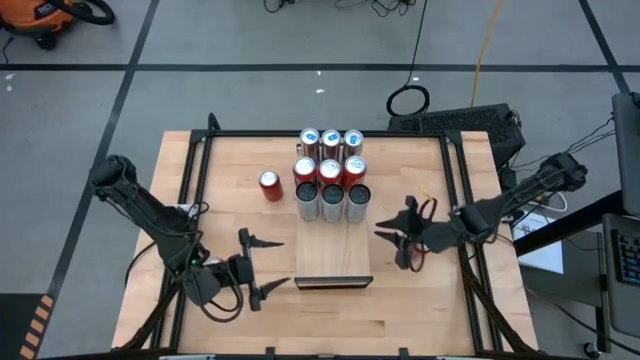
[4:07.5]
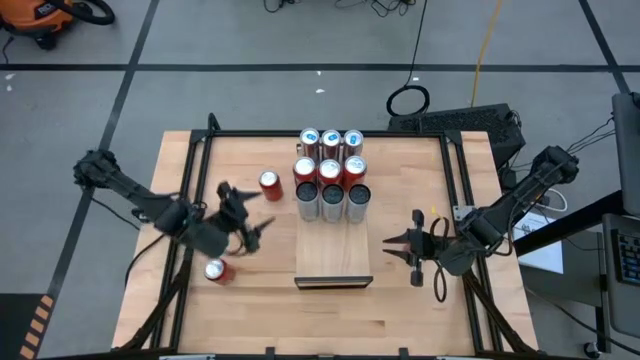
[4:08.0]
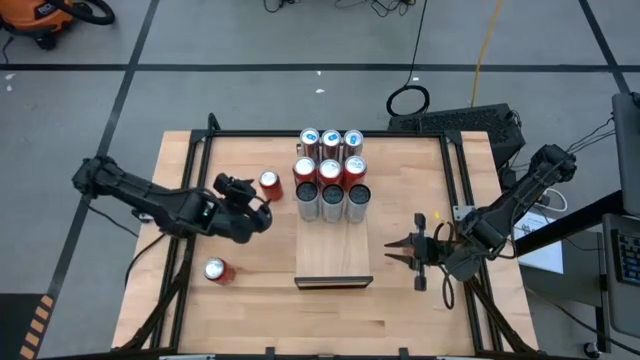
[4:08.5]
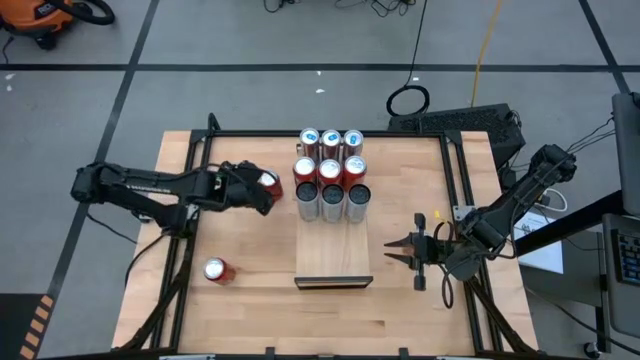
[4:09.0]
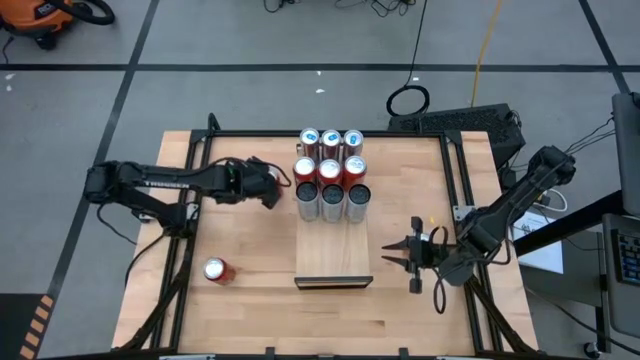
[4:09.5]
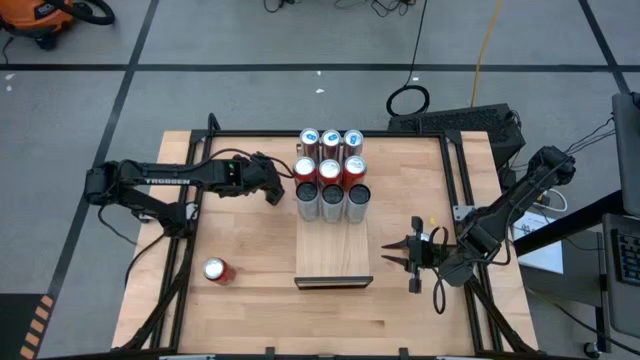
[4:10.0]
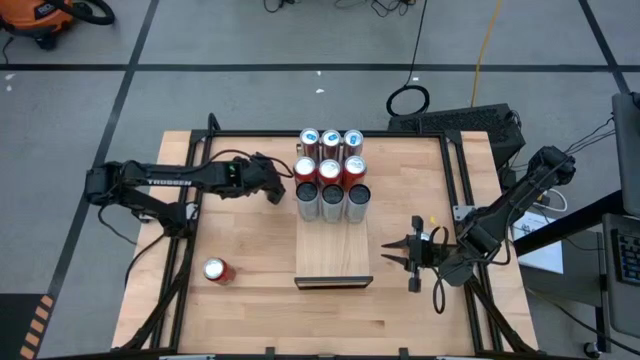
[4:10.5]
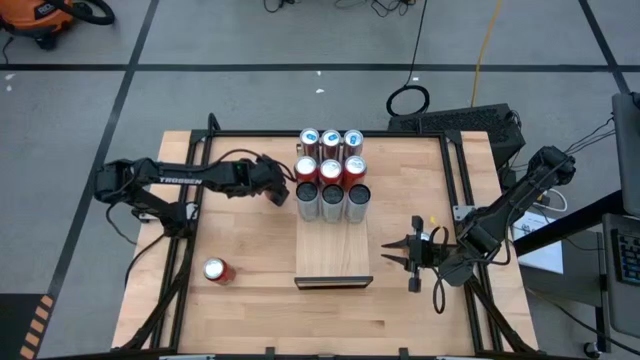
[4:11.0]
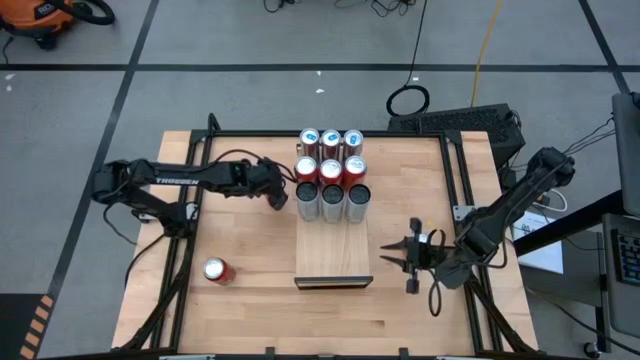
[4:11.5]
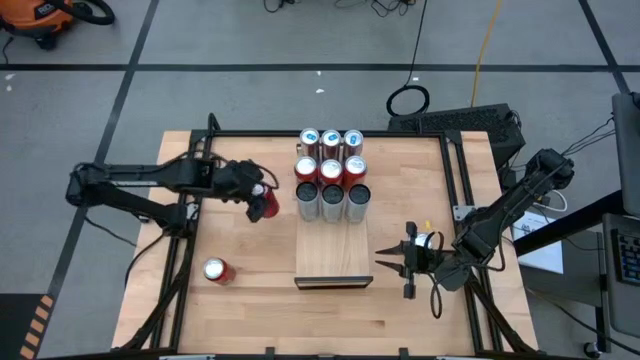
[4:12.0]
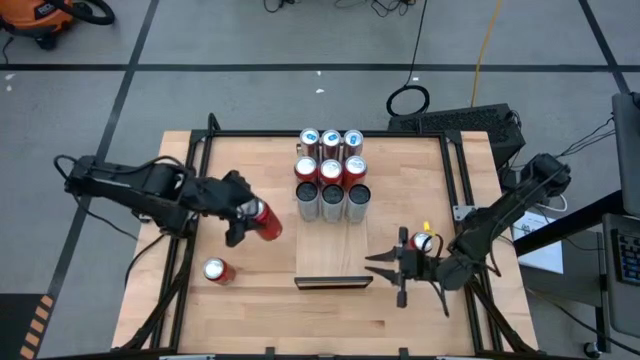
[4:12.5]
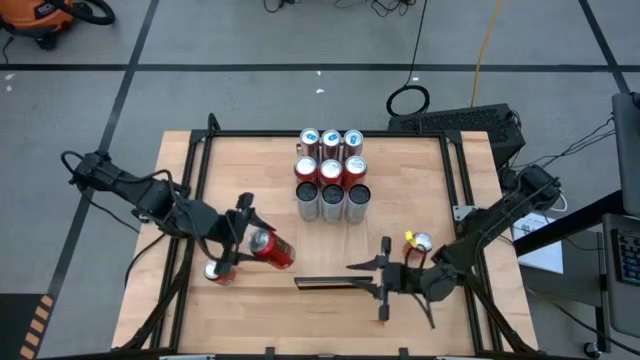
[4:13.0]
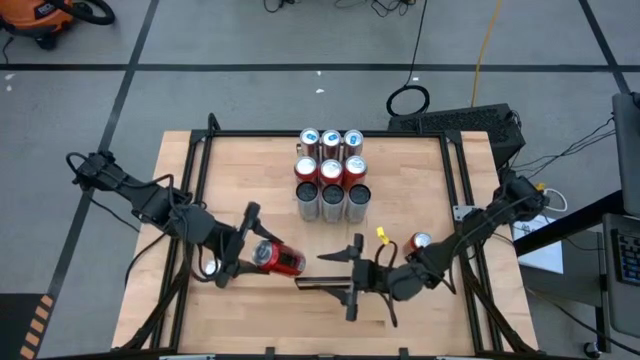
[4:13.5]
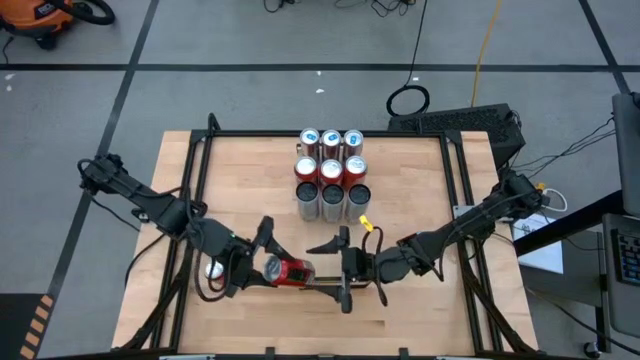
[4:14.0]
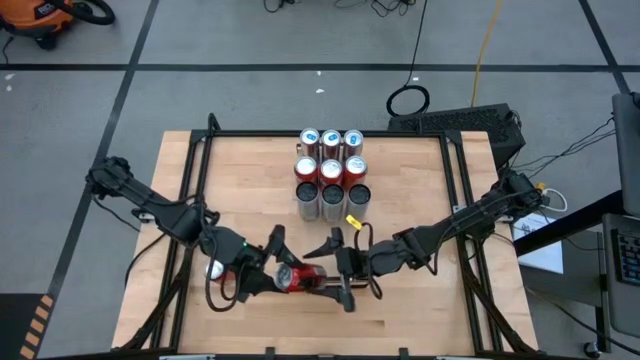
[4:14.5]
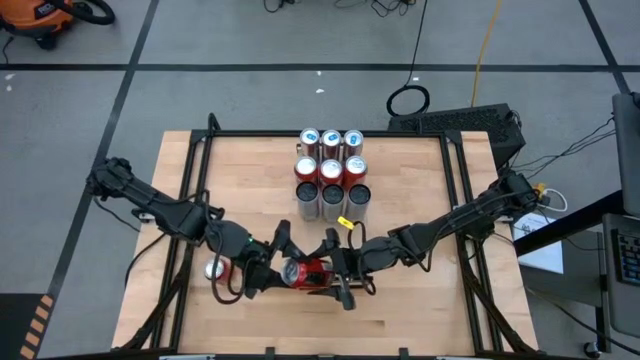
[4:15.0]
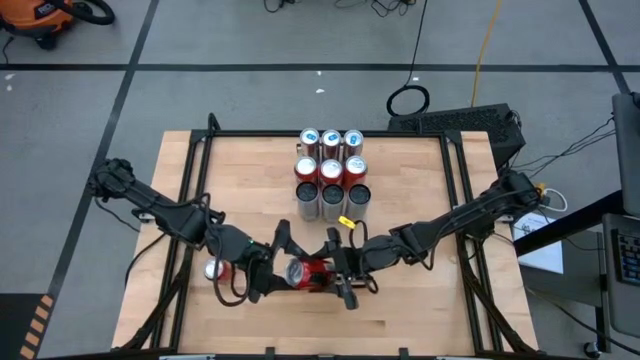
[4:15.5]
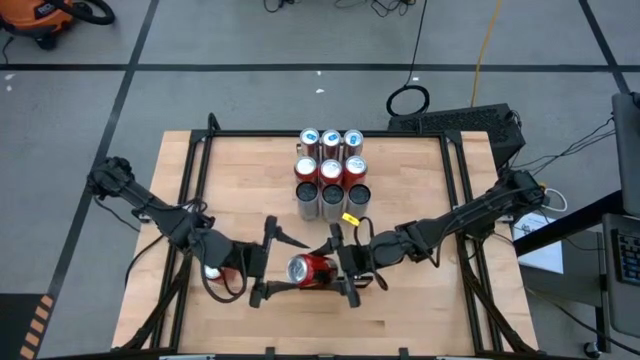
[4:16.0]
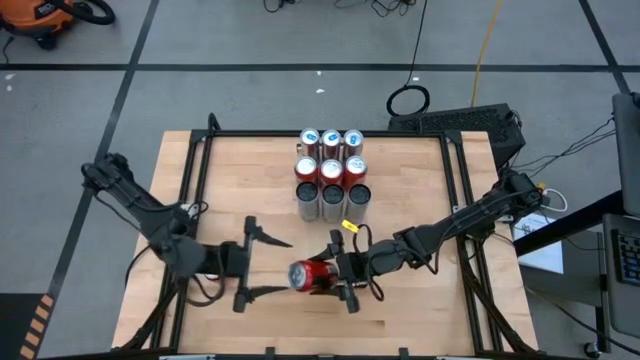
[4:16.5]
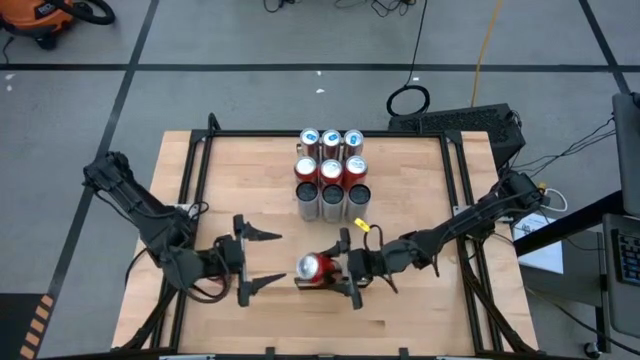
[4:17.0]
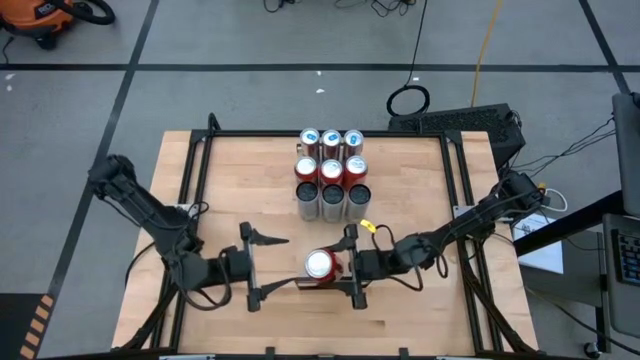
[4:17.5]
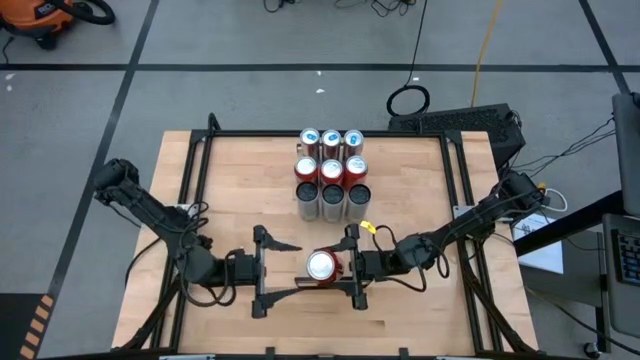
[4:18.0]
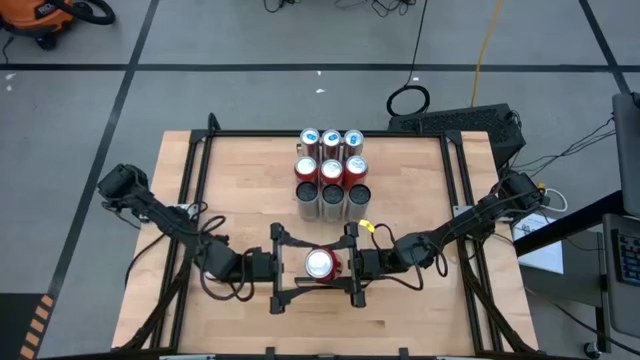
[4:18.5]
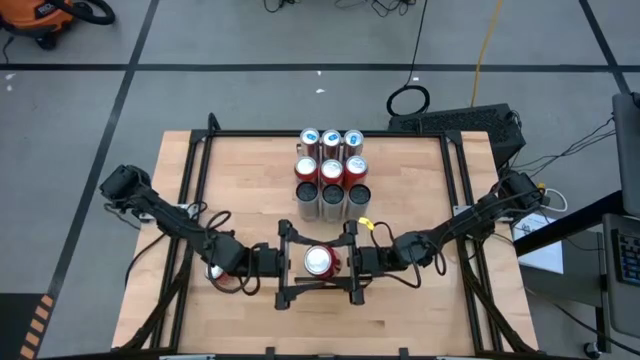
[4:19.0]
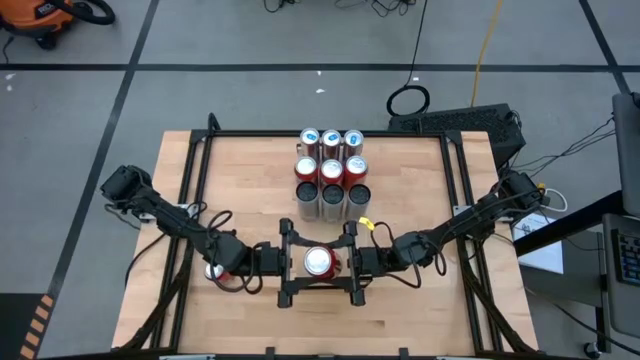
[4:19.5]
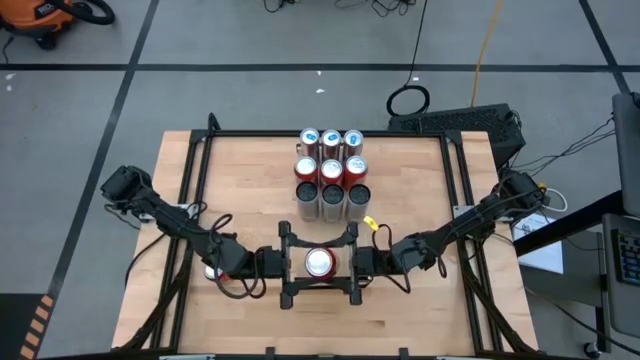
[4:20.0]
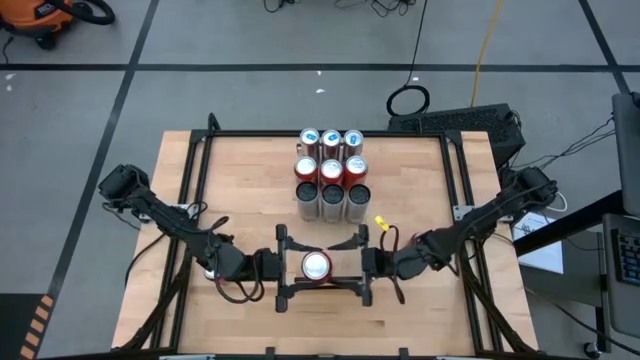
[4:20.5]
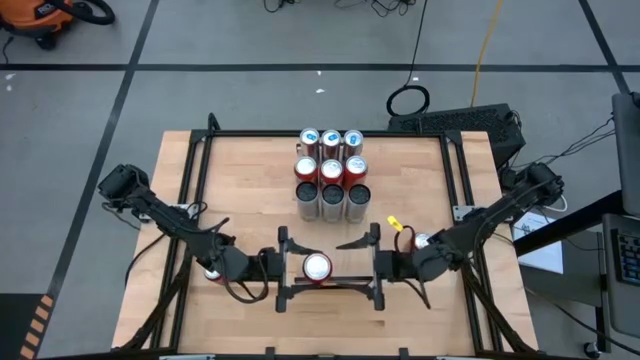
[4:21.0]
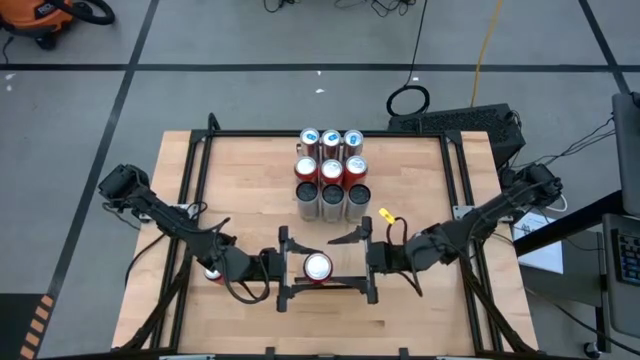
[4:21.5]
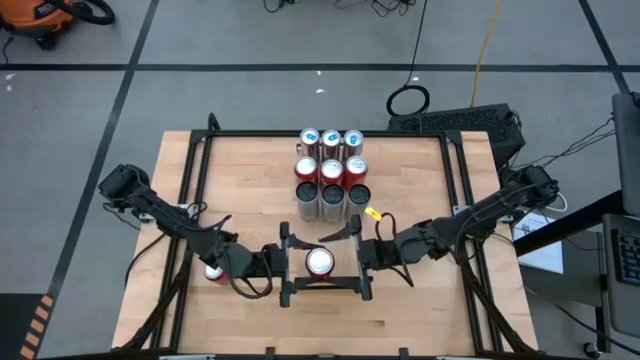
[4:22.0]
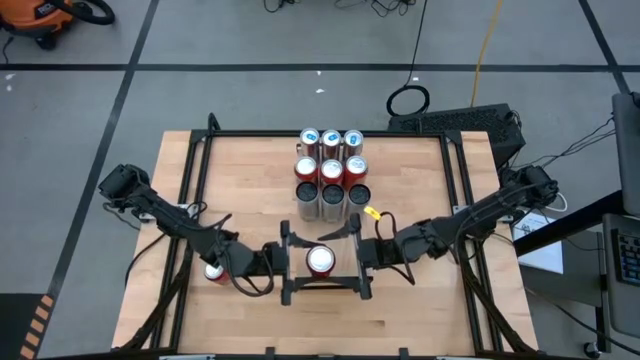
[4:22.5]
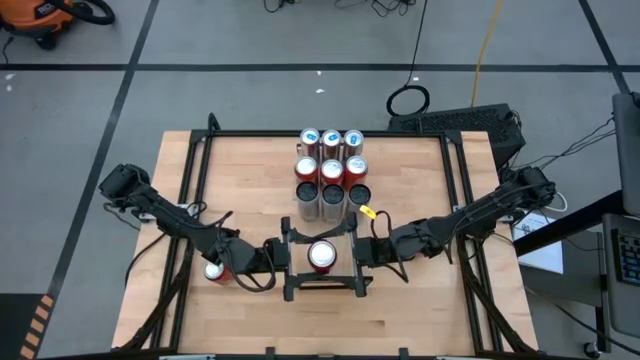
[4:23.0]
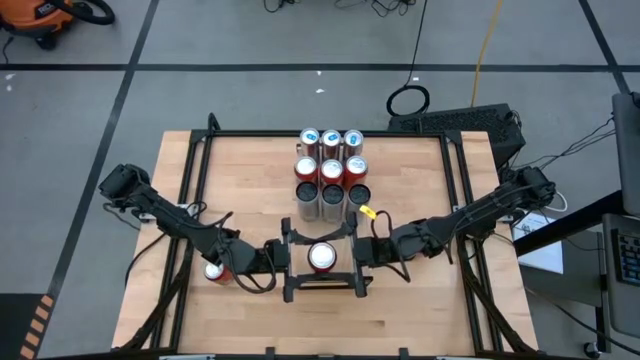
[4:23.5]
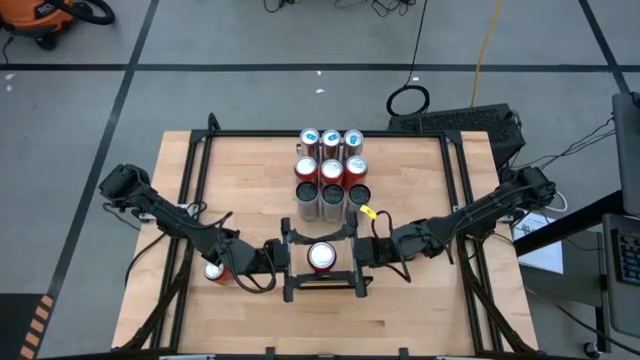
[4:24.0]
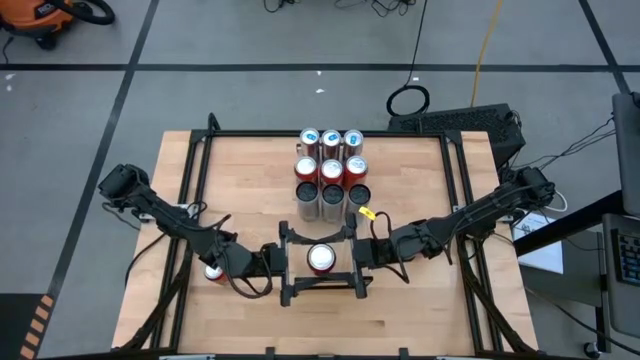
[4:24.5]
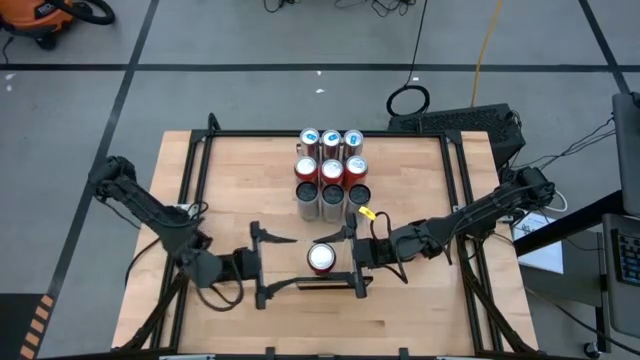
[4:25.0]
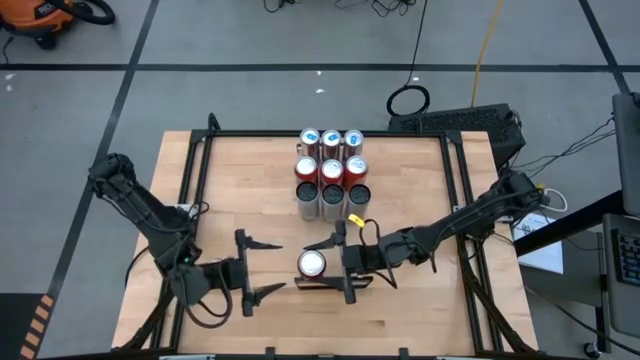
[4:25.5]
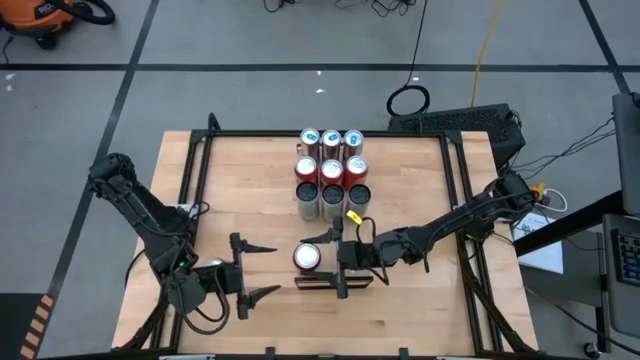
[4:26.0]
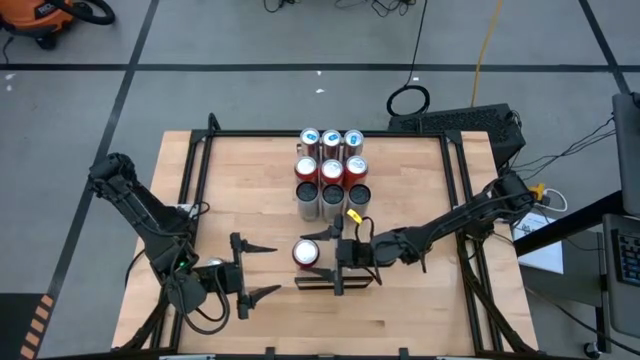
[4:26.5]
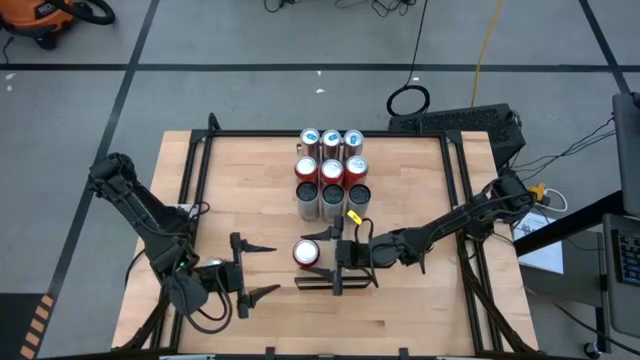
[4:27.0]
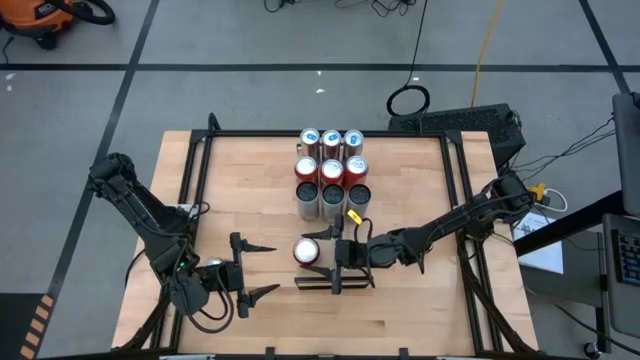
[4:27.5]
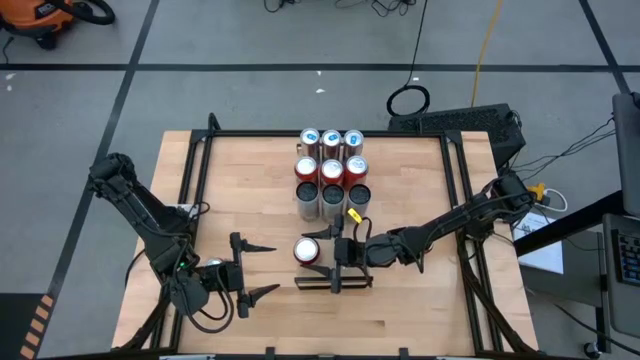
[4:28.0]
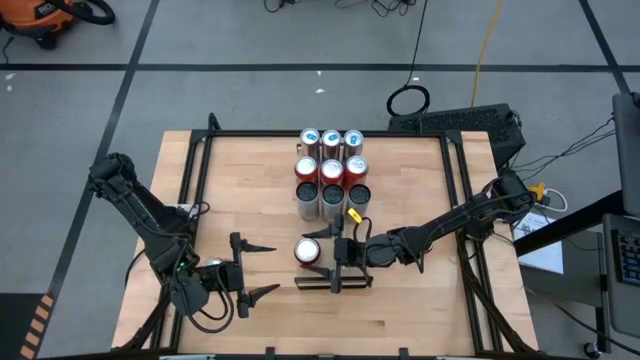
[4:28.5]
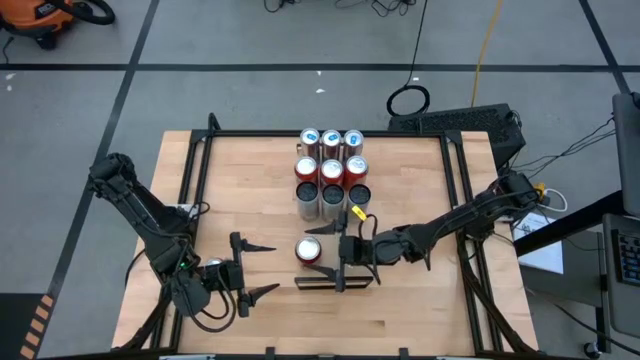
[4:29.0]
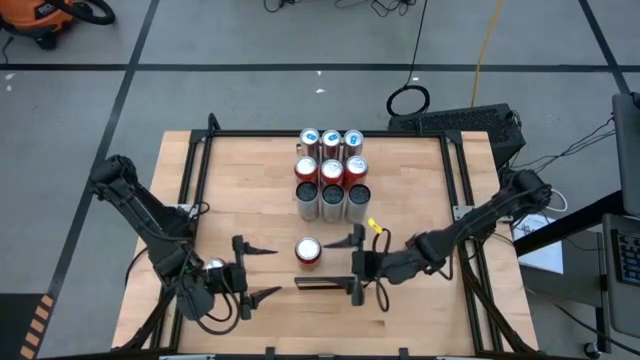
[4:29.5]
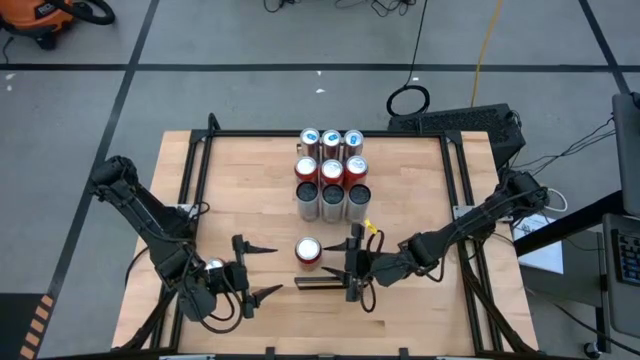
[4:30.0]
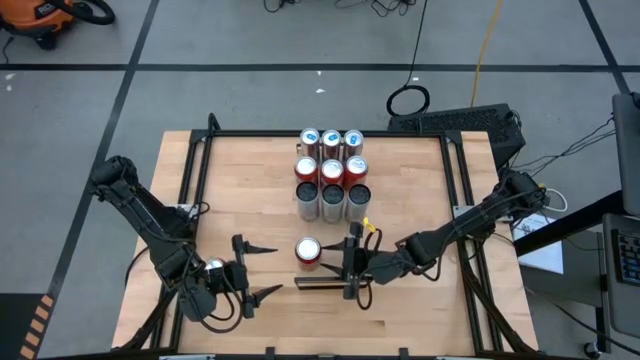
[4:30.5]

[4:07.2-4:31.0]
Task: Place canned beverage on shelf
Put the top red black soda can on the shelf
